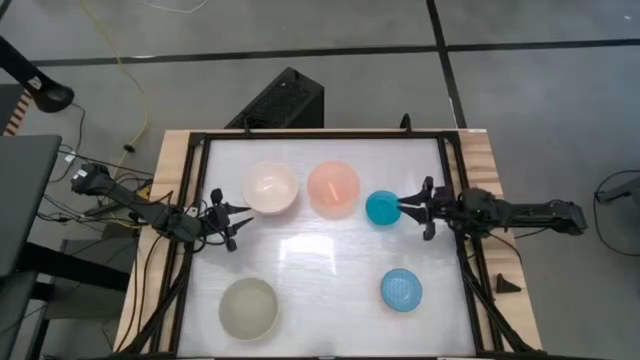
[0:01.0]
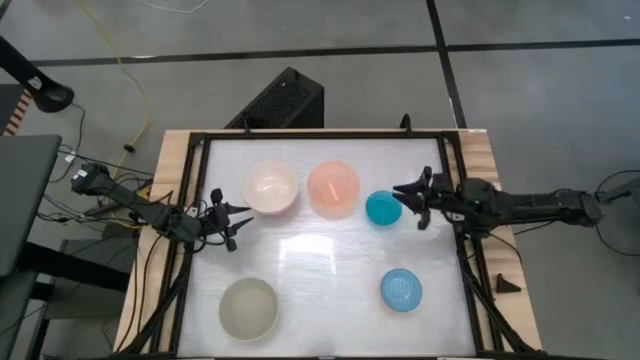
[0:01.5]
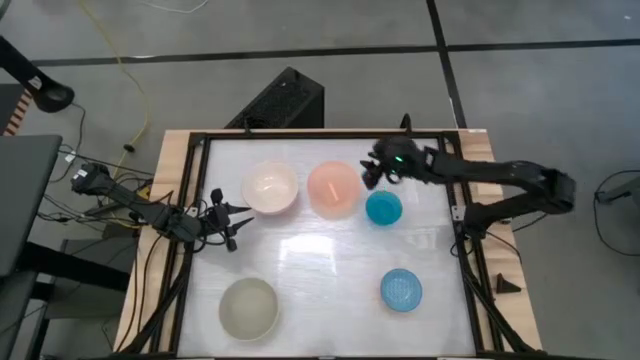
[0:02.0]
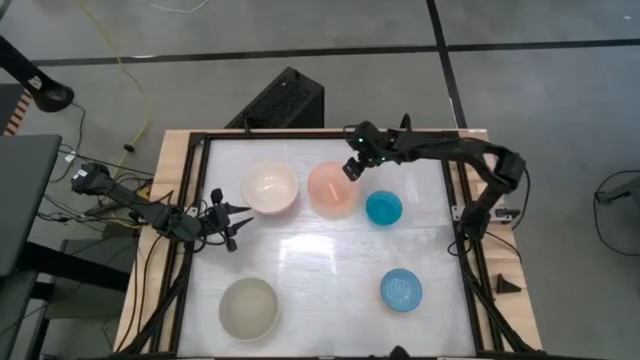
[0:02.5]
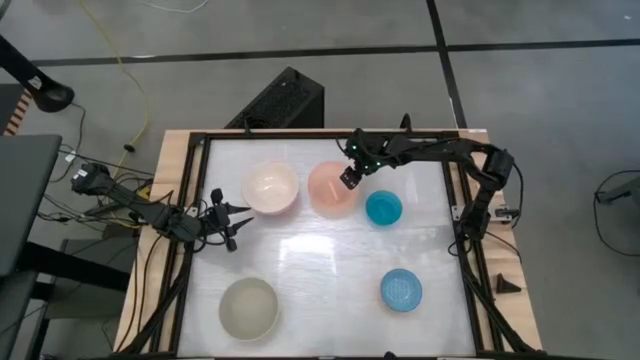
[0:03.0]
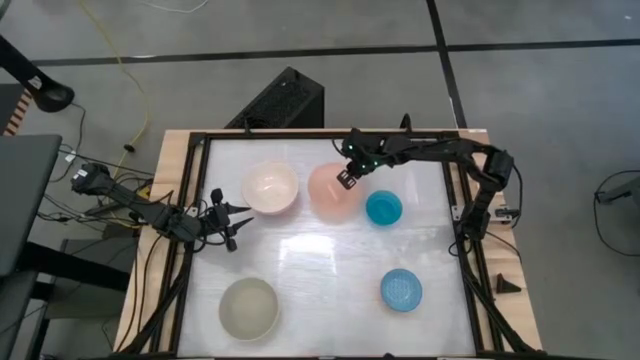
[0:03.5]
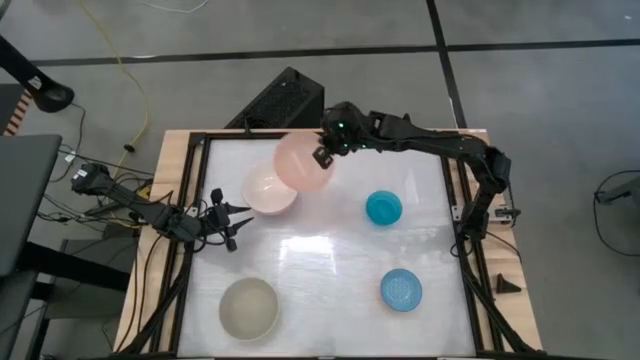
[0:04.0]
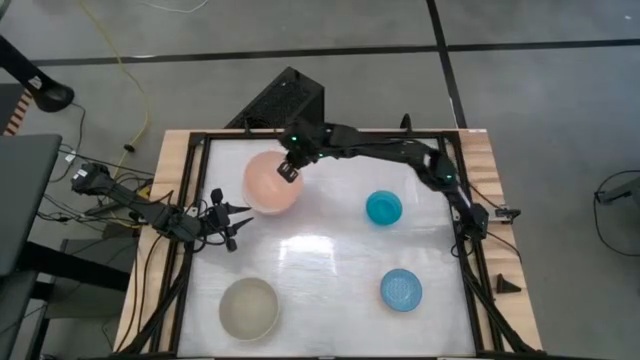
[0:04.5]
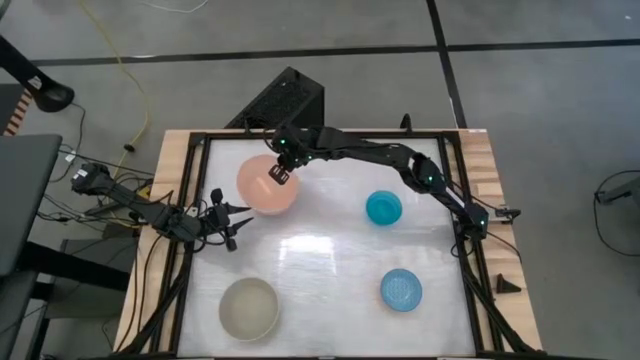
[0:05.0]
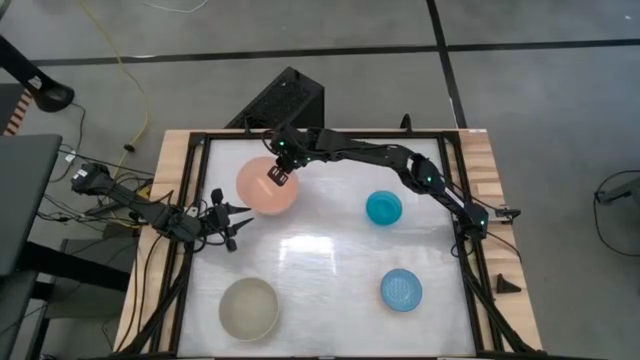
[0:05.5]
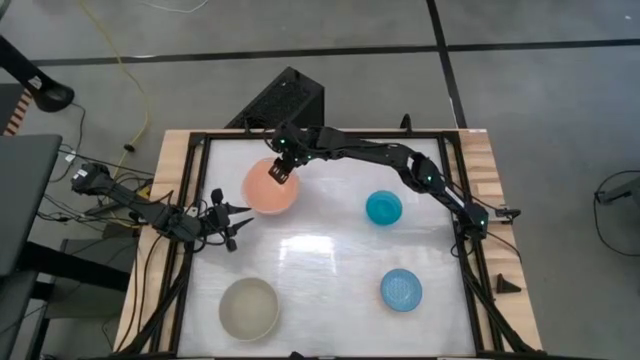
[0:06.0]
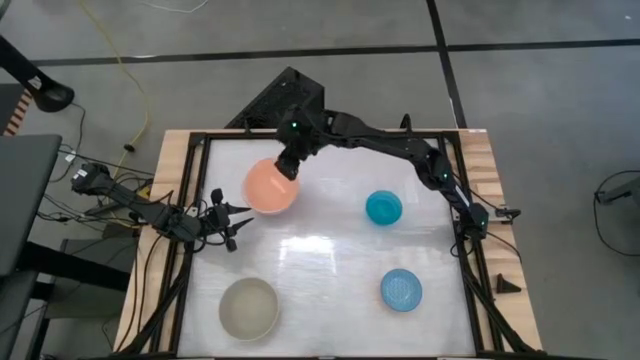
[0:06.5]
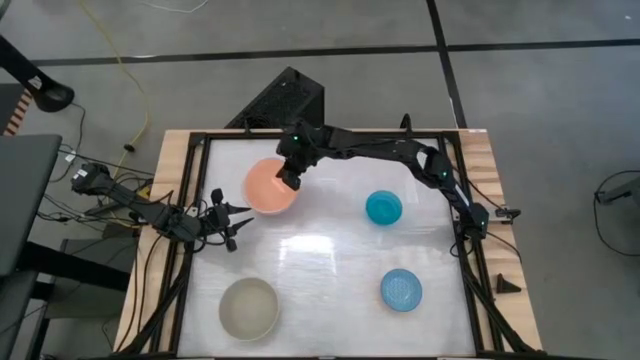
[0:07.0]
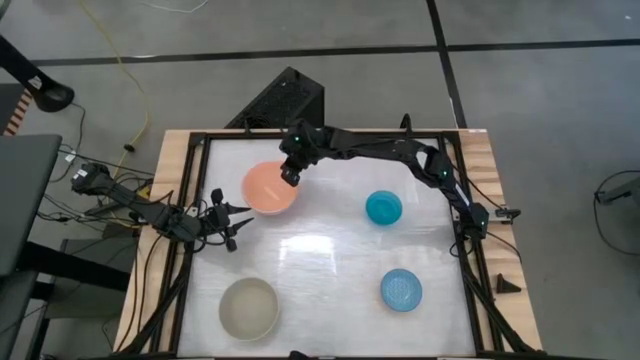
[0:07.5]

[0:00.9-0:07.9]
Stack the light orange bowl into the white bowl

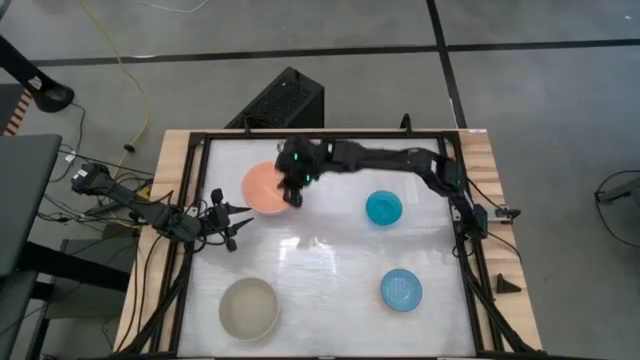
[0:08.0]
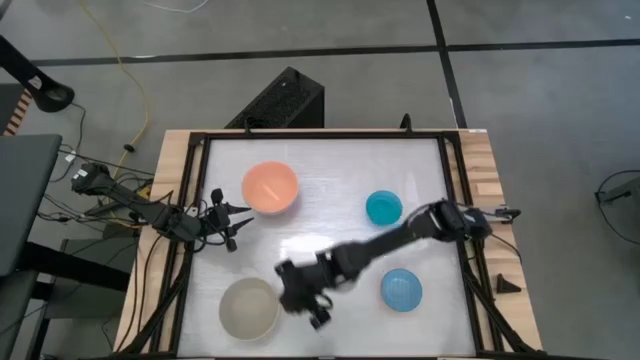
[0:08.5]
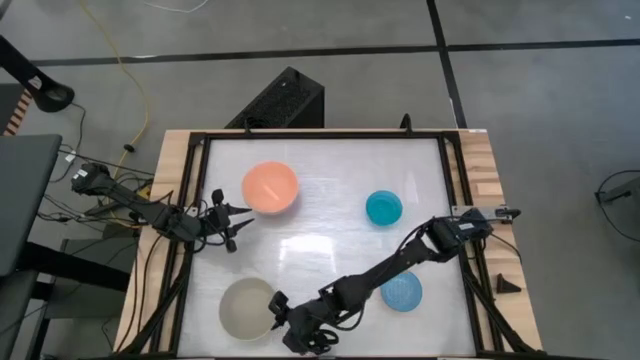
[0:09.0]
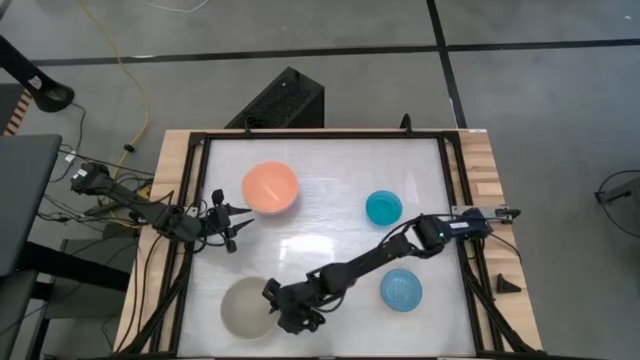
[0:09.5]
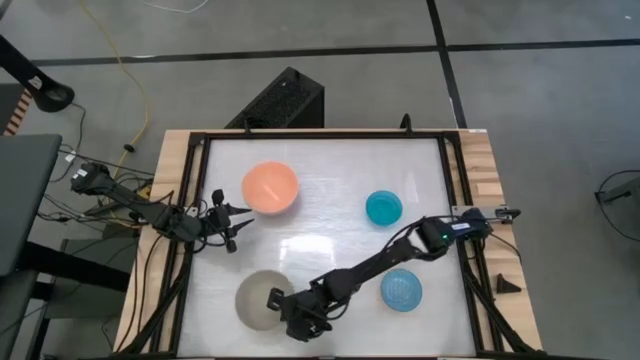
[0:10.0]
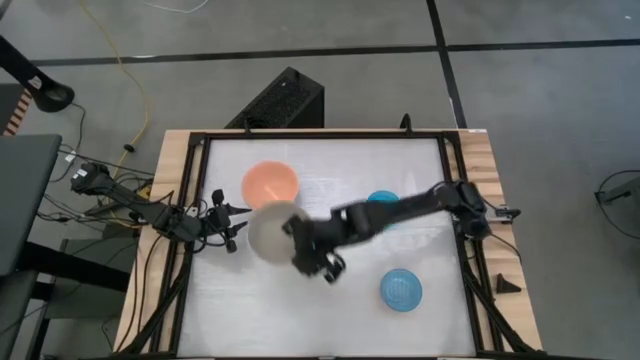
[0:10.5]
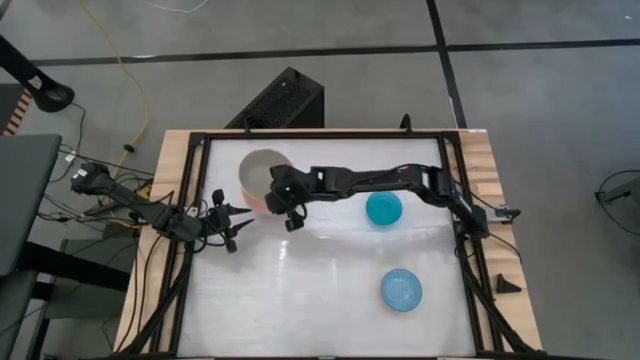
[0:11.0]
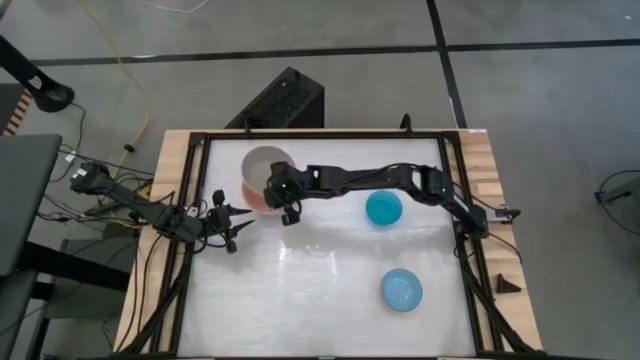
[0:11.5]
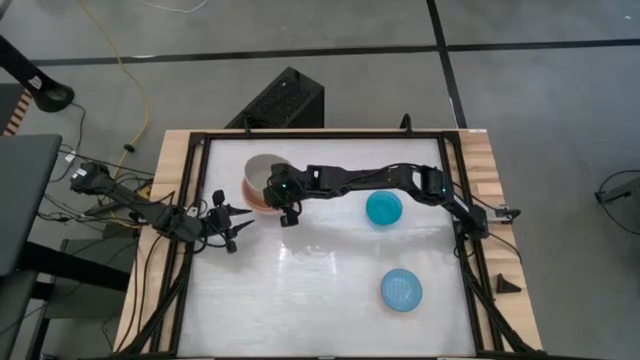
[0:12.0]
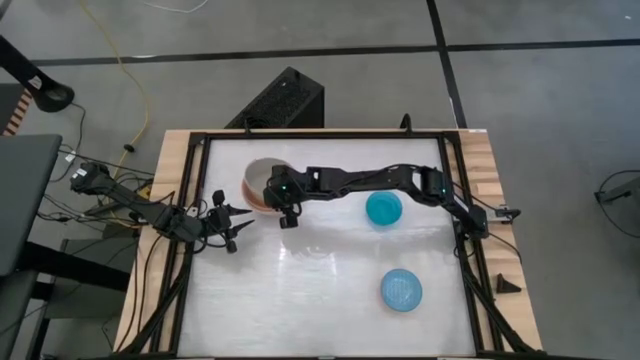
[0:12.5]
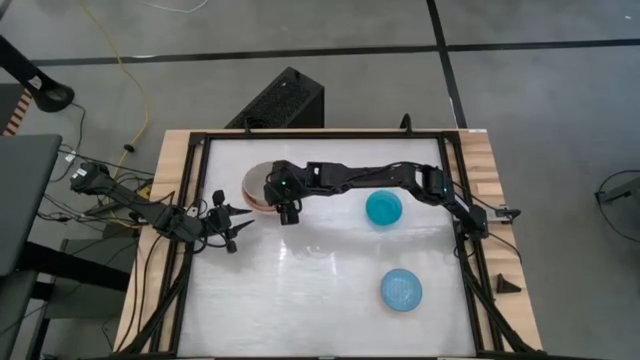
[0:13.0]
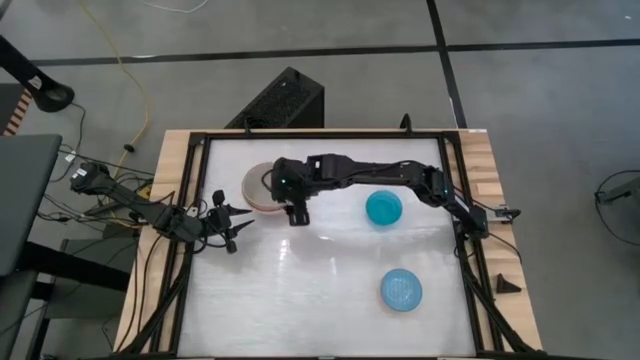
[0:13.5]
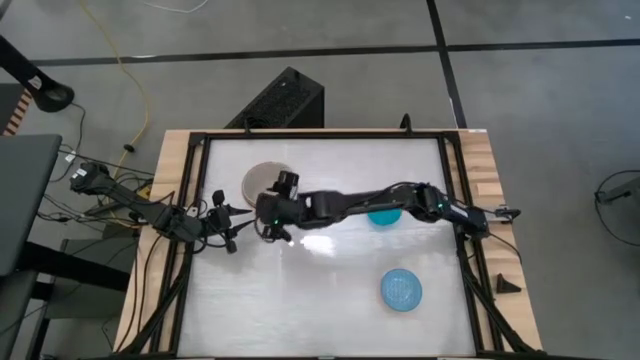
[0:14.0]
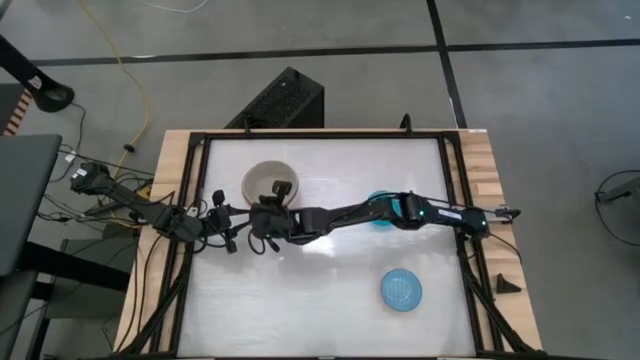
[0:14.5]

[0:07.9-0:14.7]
Stack the gray bowl into the light orange bowl

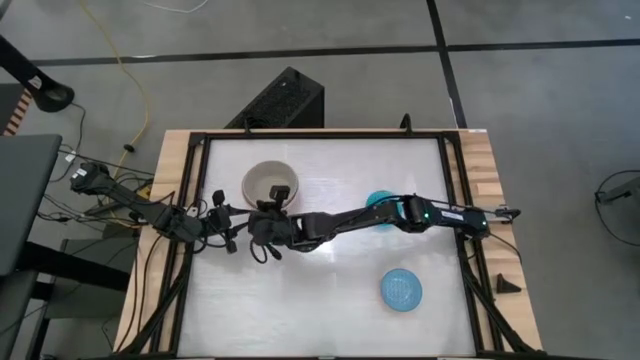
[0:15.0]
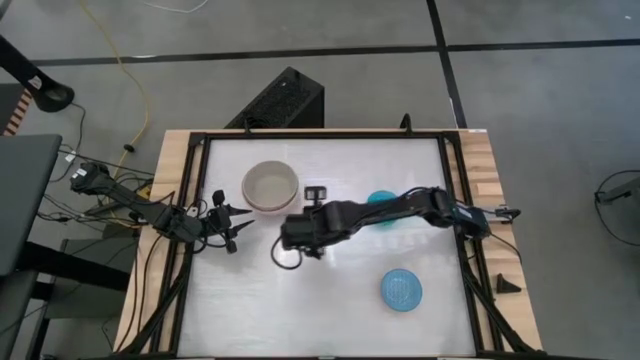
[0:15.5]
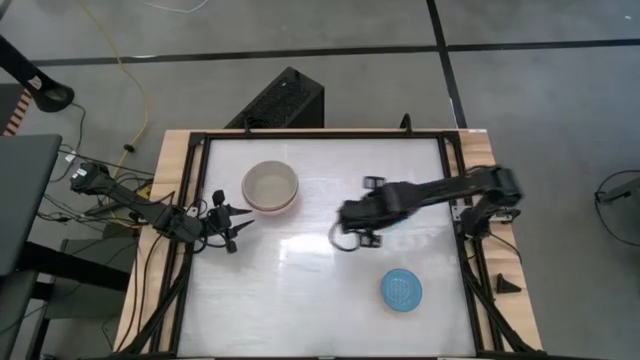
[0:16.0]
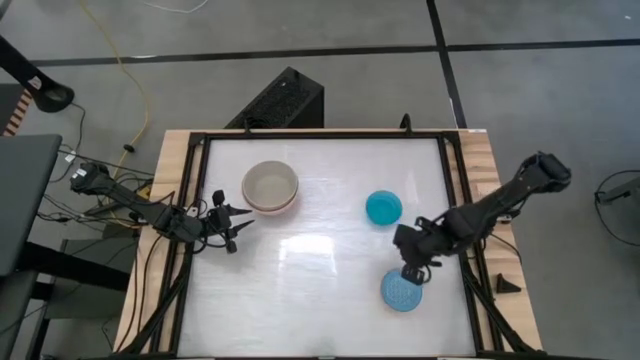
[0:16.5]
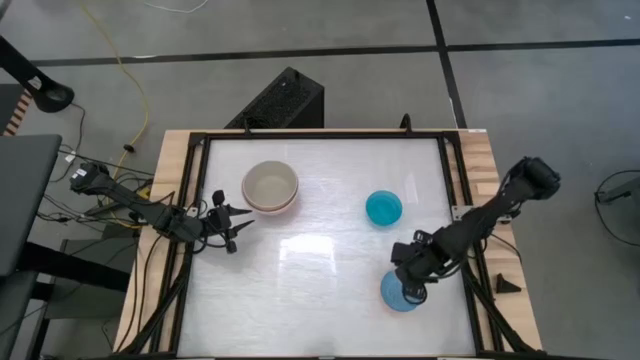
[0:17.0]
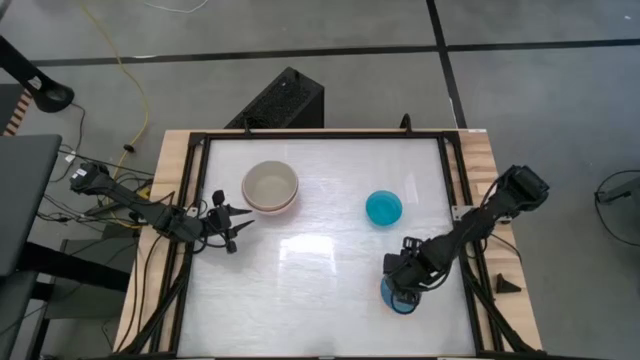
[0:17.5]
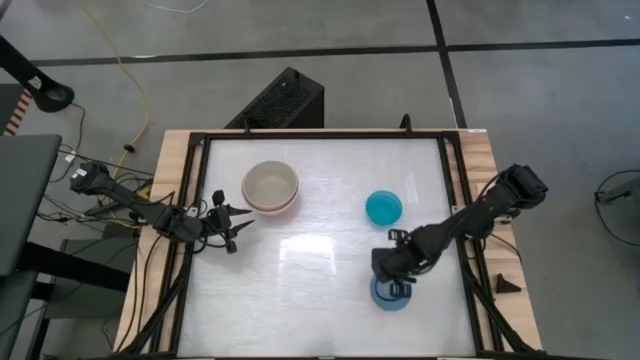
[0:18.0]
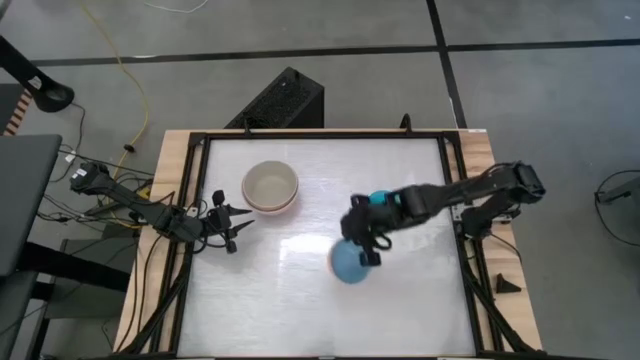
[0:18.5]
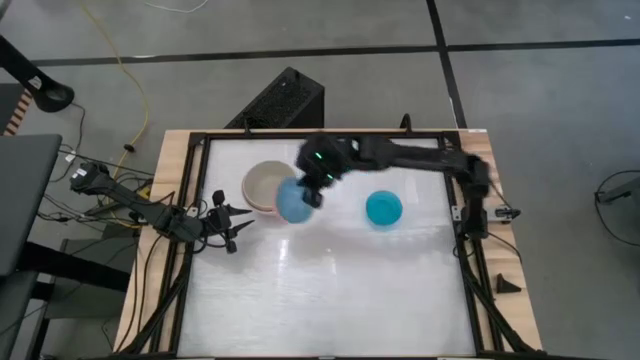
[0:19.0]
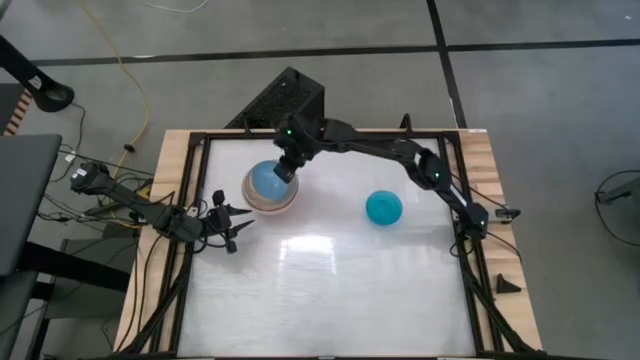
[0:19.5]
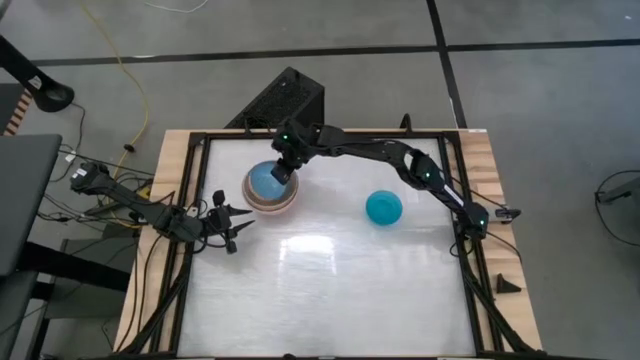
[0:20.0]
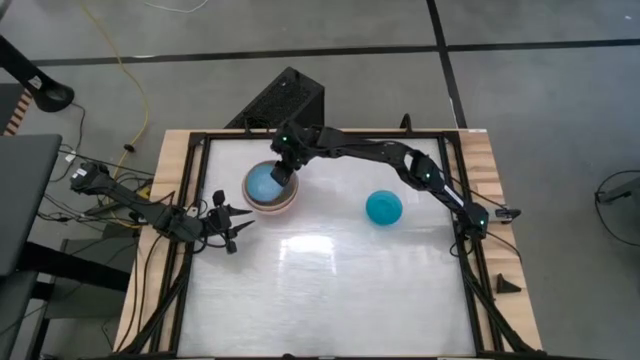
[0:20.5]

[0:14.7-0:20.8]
Stack the white and blue bowl into the gray bowl

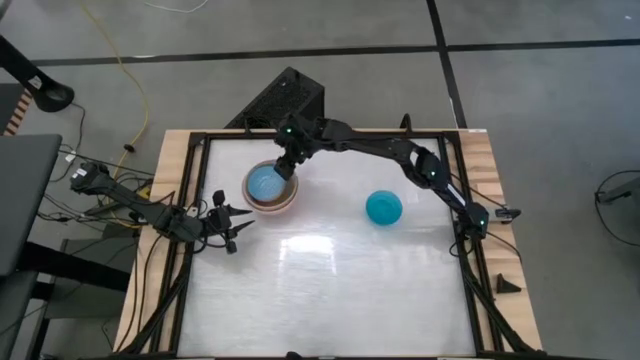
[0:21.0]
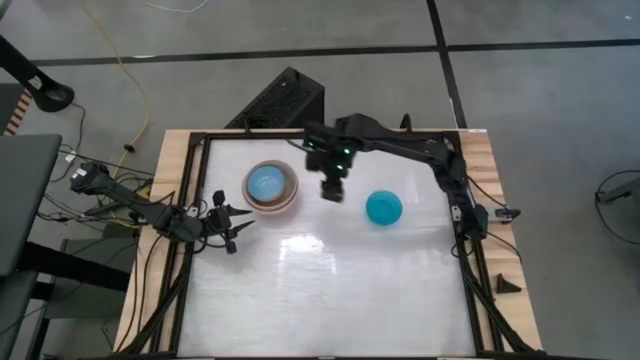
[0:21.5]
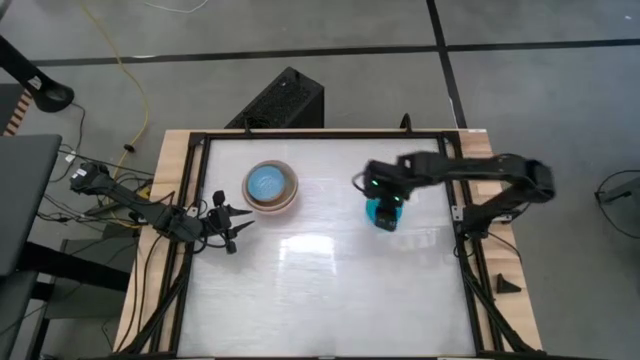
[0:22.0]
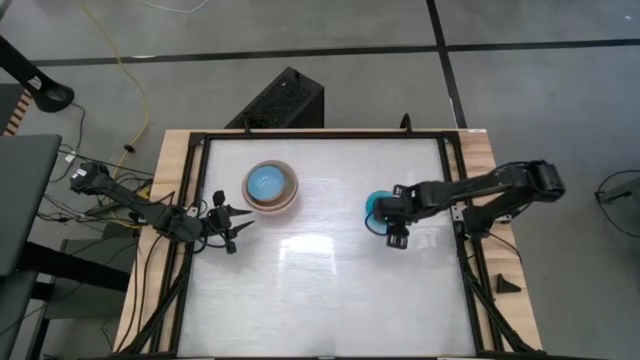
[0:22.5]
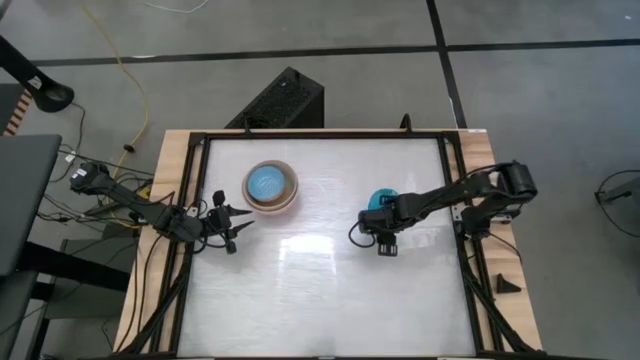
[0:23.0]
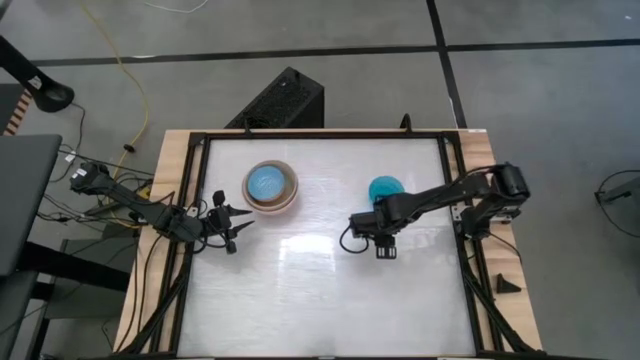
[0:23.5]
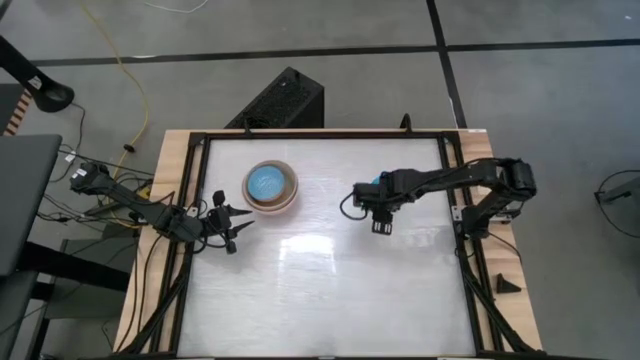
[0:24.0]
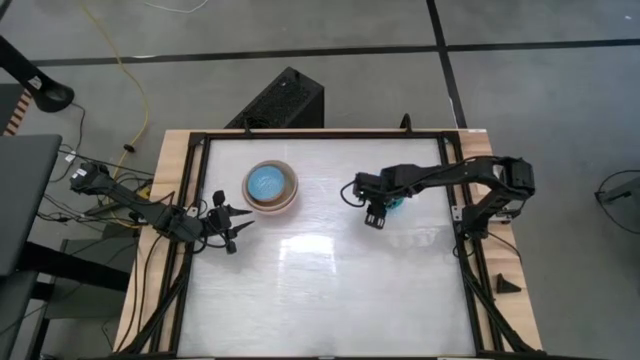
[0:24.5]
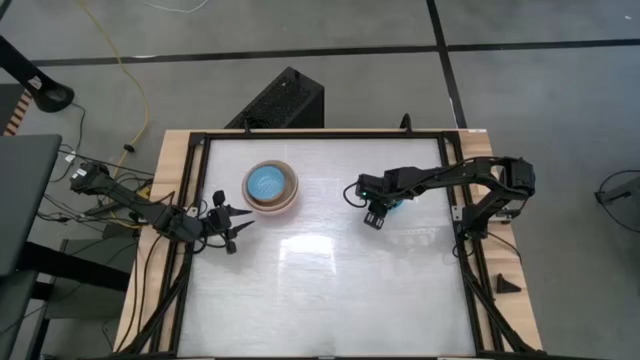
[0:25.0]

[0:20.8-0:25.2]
Stack the light blue bowl into the white and blue bowl
